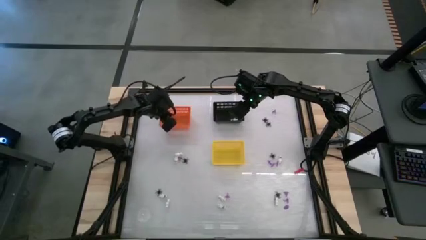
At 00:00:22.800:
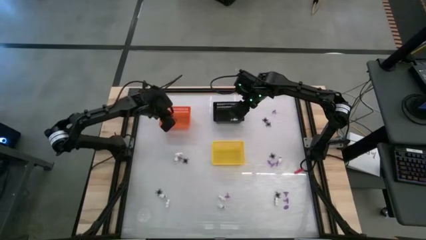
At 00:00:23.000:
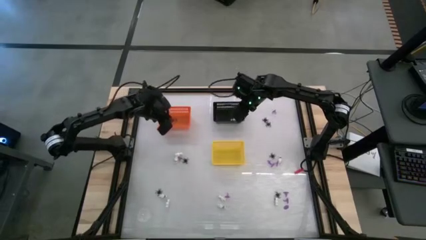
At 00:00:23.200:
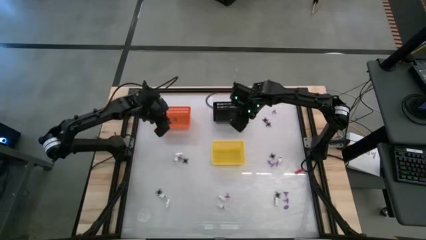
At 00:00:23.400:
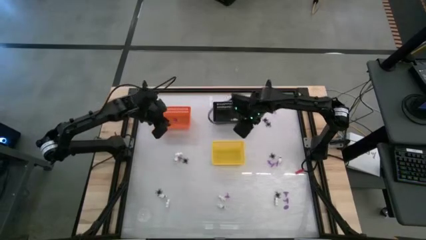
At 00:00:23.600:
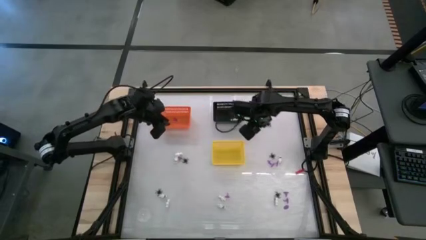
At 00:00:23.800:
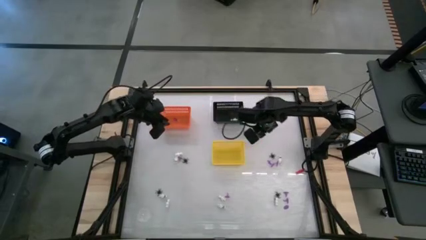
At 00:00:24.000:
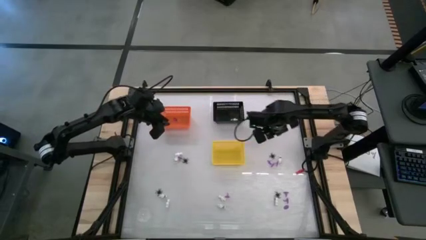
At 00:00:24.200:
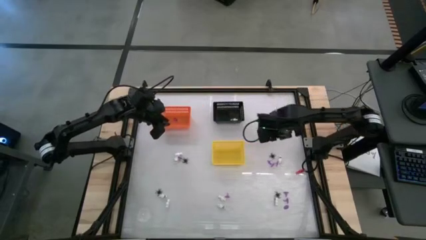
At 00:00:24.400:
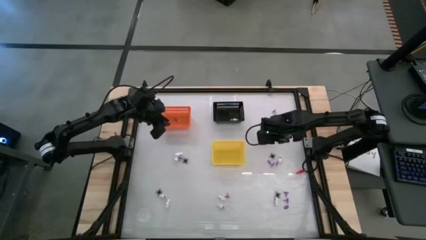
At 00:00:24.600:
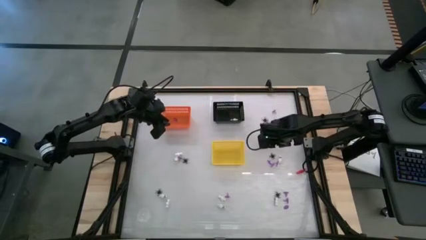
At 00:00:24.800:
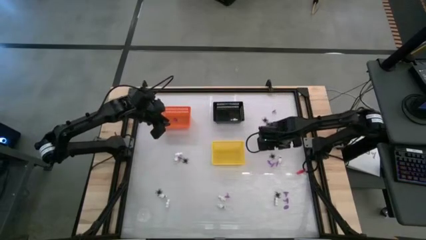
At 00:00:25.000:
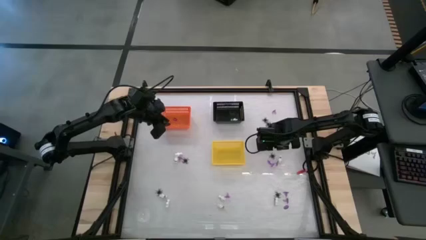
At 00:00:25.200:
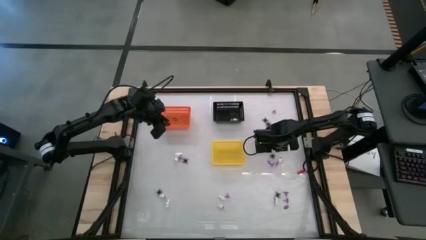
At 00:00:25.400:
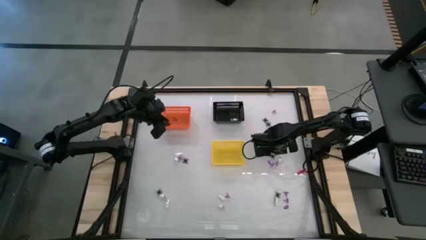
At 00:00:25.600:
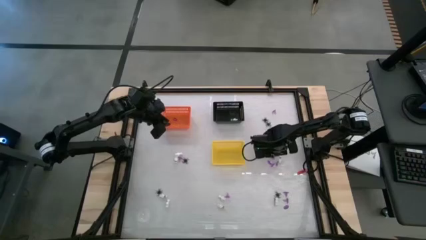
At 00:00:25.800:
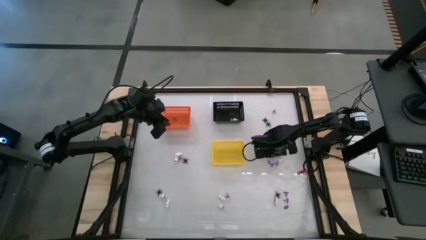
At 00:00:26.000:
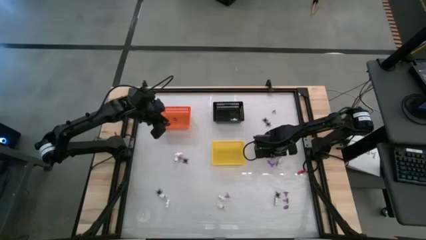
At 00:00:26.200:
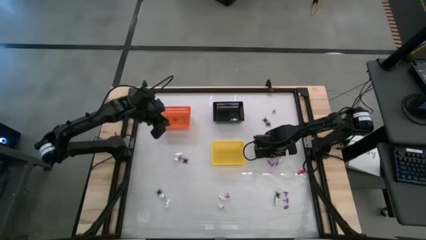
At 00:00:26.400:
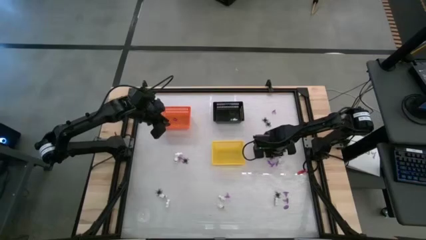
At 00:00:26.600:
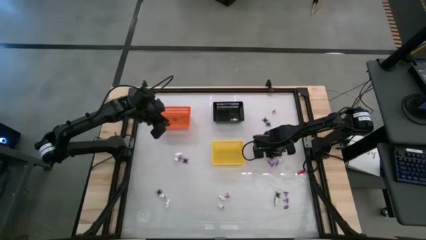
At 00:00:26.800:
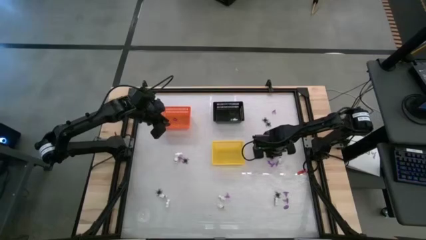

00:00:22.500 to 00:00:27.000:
Task: Sort Halloween decoration
Put the black spider toy into the yellow bin

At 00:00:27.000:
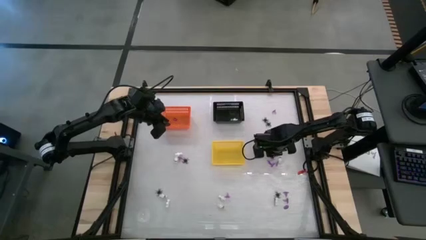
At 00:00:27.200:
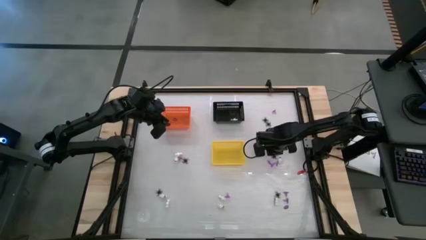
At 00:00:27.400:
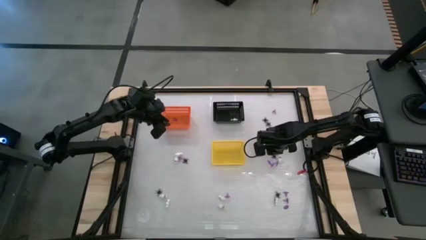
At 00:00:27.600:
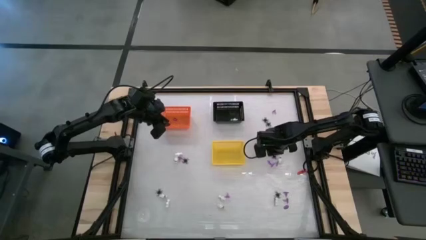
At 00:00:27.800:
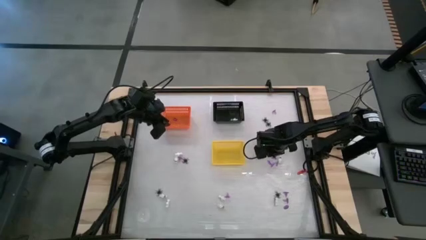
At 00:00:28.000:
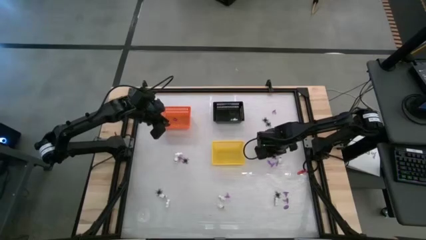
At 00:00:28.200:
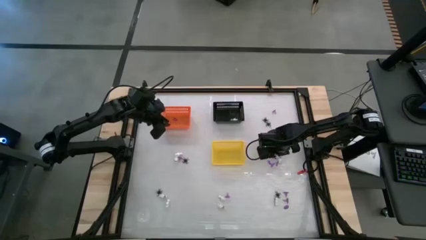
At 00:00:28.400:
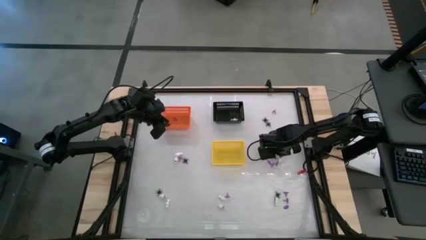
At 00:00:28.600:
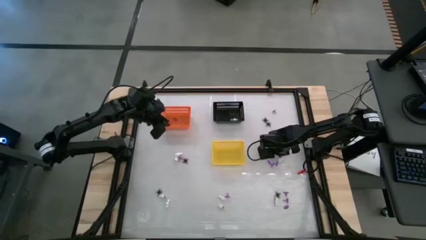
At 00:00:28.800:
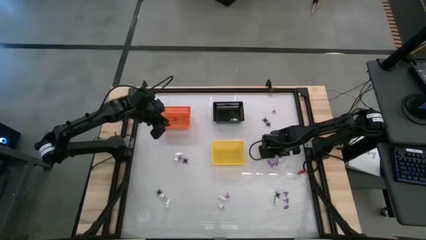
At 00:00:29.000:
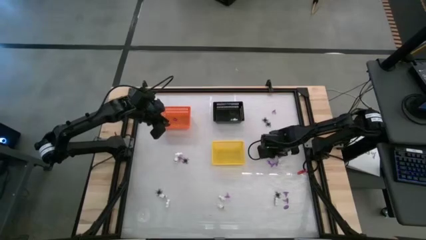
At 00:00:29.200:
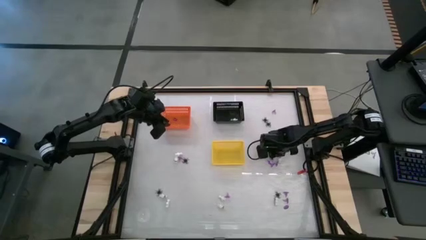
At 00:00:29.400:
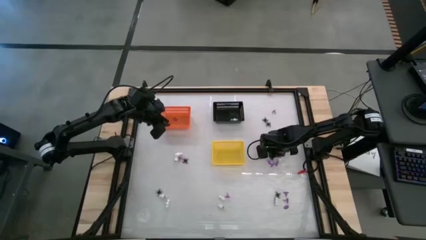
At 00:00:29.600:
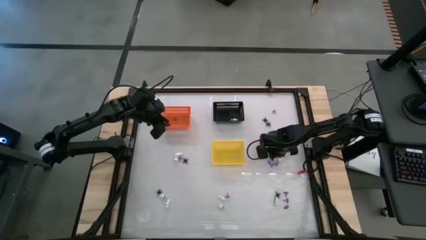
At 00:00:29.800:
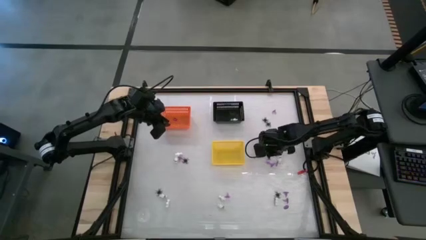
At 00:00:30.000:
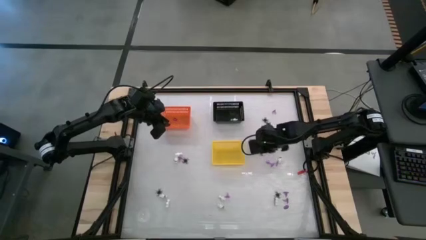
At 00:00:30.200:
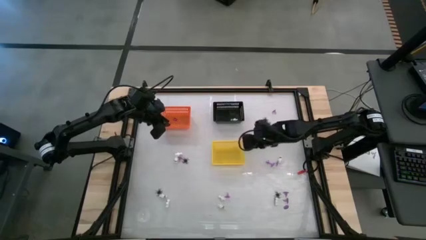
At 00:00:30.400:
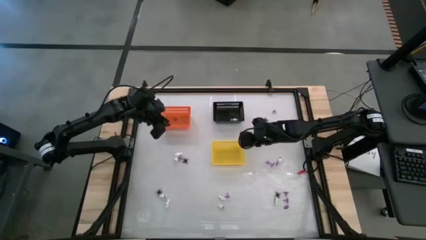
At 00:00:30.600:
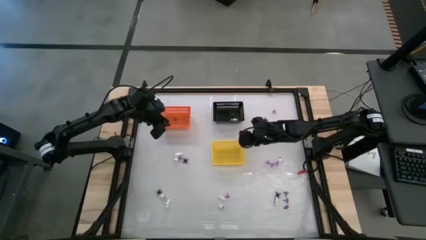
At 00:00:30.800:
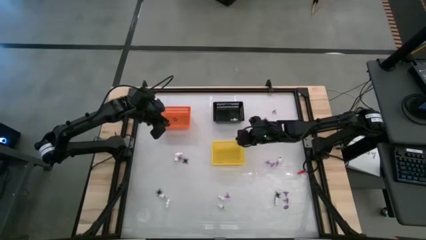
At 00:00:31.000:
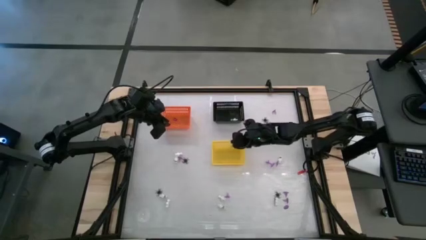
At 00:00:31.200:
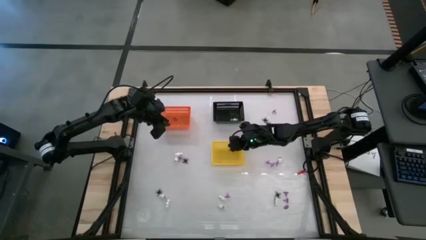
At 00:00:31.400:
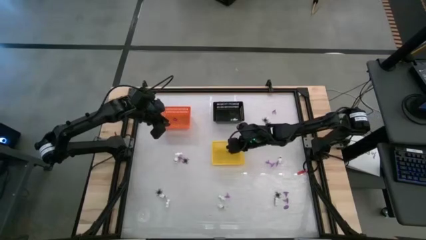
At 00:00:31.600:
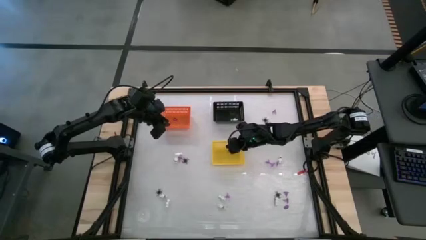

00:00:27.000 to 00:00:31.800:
Put the black spider toy into the yellow bin

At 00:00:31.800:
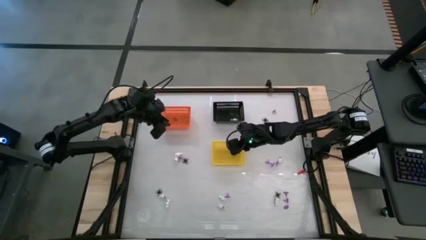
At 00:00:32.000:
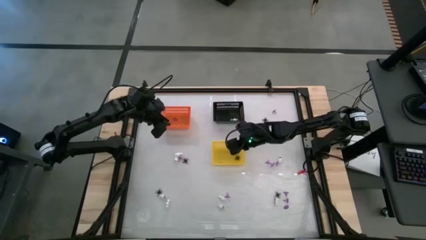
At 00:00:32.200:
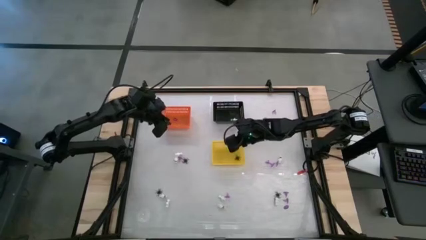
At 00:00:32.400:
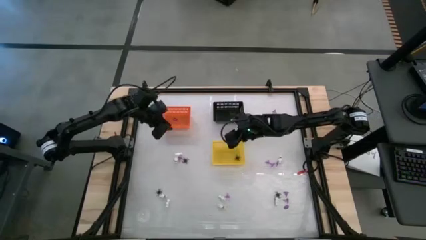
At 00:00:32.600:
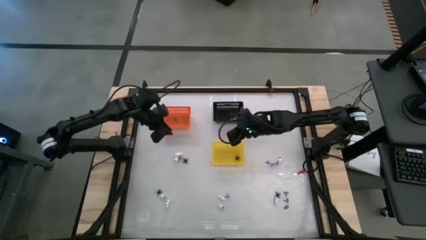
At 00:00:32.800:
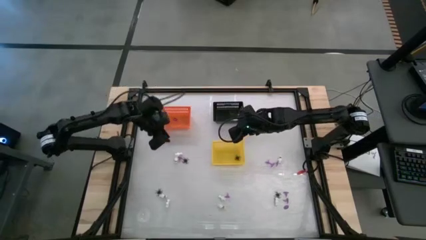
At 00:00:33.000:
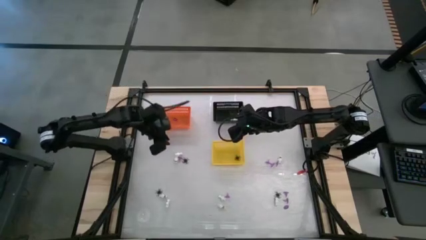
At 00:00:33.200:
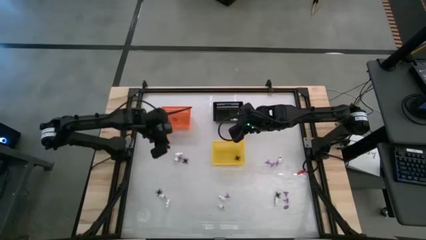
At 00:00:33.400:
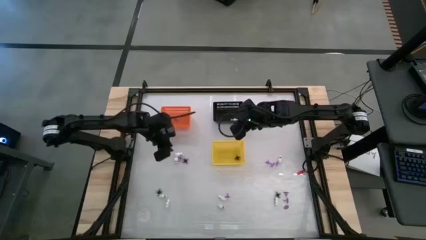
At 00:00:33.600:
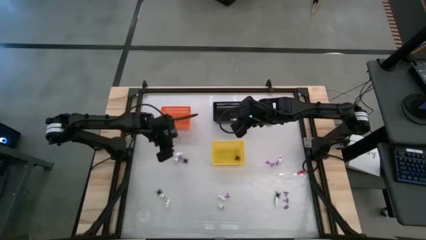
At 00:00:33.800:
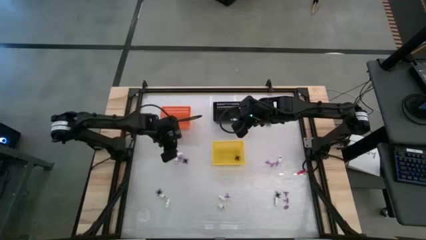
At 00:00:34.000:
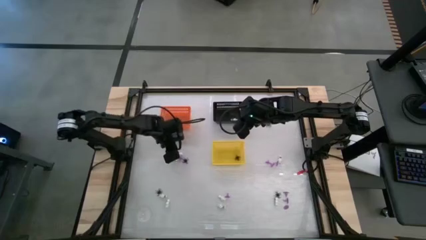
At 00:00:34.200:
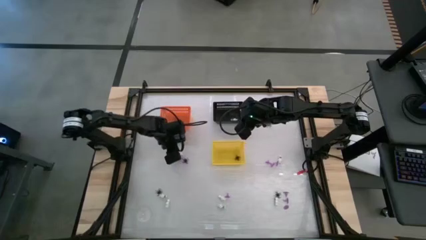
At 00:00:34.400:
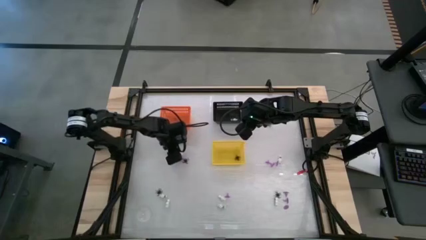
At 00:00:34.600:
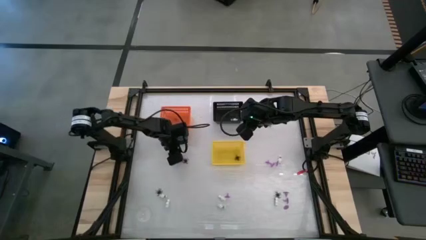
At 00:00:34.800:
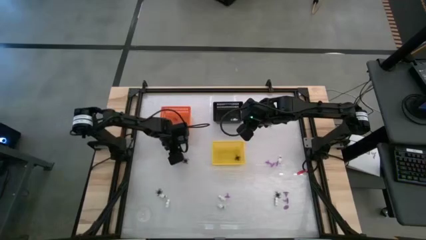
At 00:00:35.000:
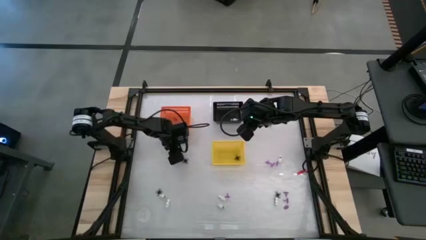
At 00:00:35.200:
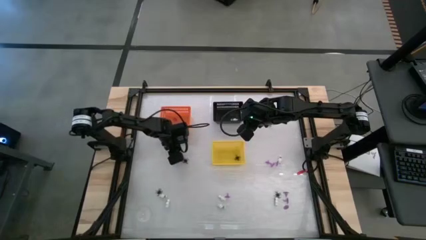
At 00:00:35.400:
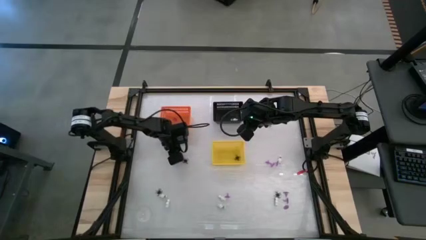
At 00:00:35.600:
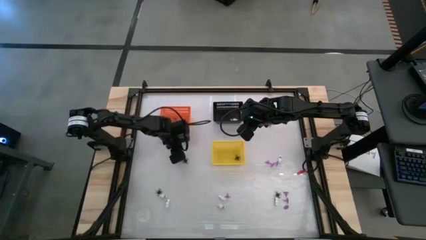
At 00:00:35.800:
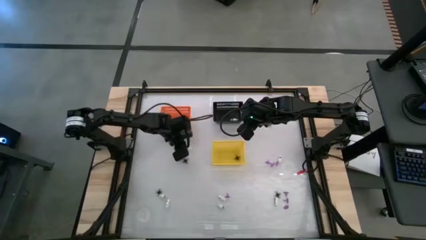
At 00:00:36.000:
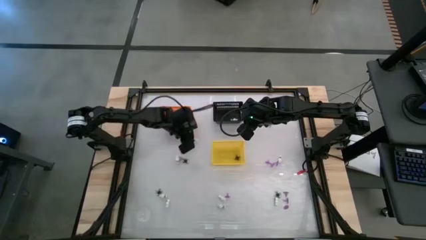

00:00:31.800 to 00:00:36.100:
Put the white skeleton toy into the black bin

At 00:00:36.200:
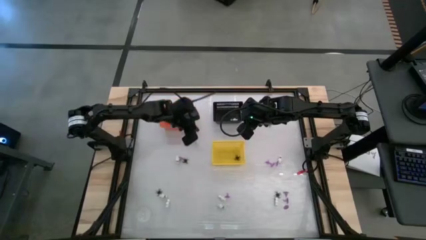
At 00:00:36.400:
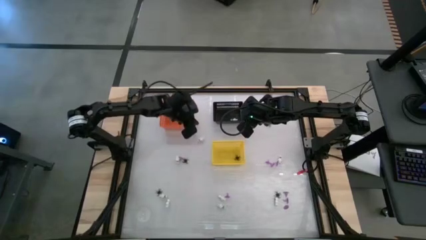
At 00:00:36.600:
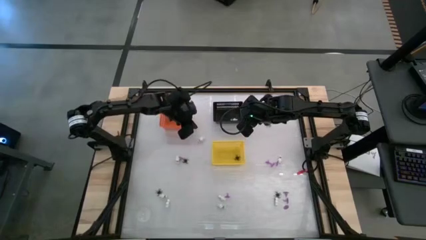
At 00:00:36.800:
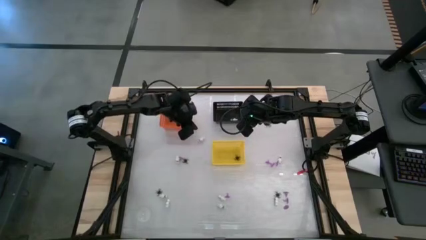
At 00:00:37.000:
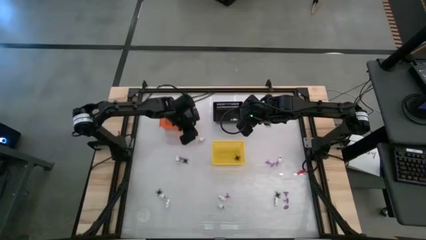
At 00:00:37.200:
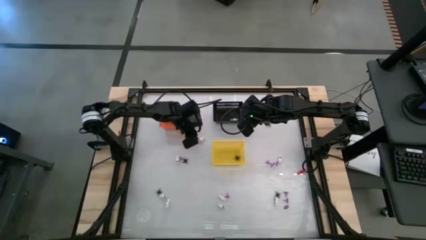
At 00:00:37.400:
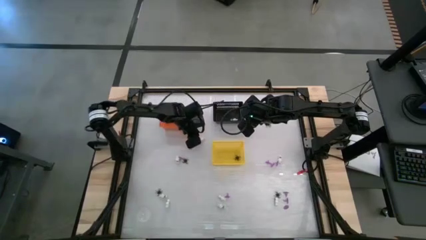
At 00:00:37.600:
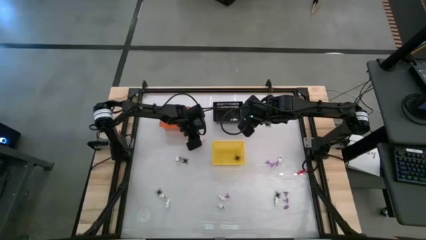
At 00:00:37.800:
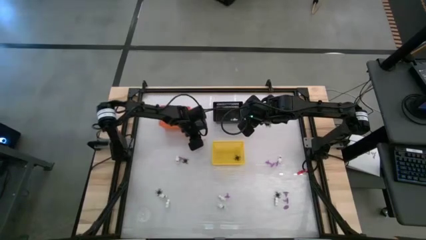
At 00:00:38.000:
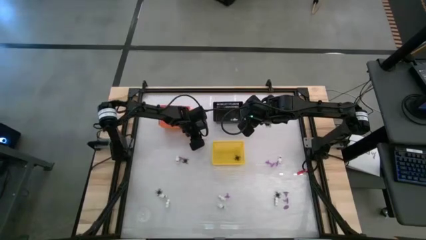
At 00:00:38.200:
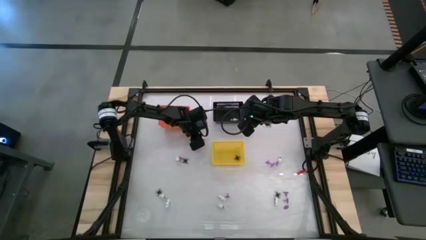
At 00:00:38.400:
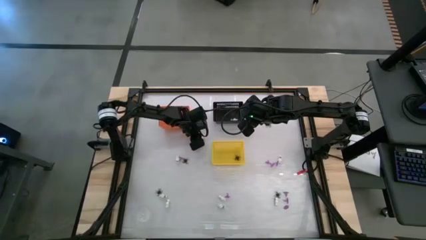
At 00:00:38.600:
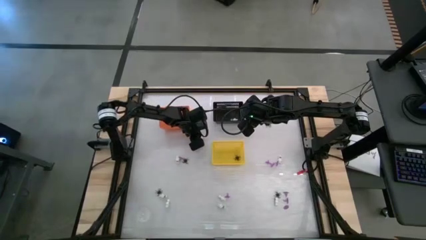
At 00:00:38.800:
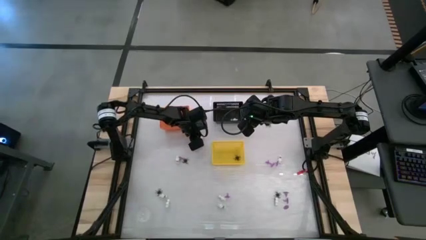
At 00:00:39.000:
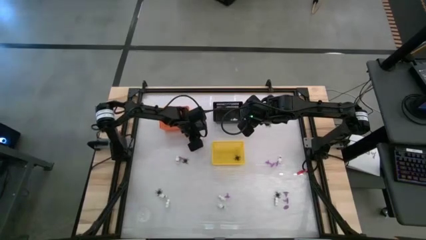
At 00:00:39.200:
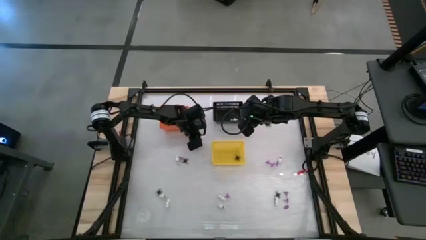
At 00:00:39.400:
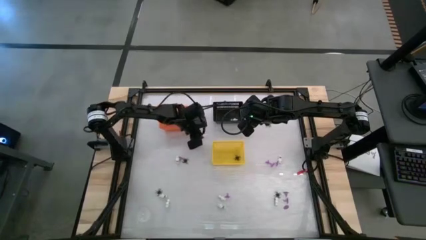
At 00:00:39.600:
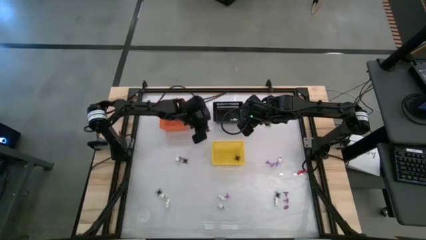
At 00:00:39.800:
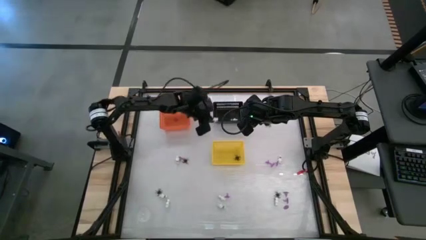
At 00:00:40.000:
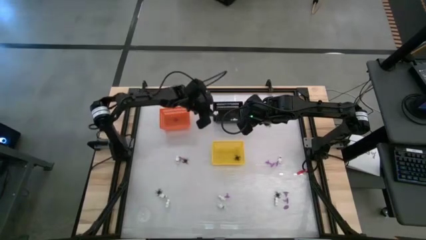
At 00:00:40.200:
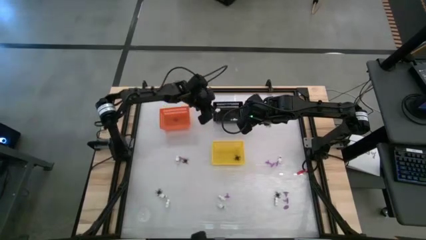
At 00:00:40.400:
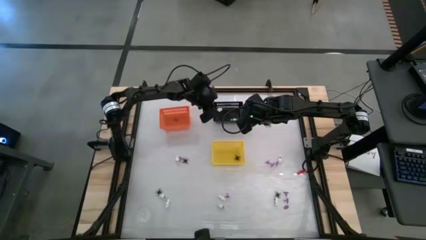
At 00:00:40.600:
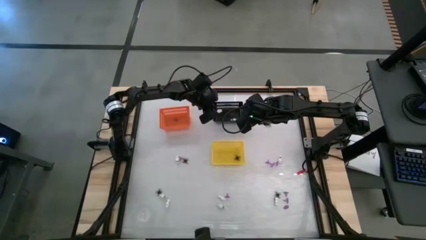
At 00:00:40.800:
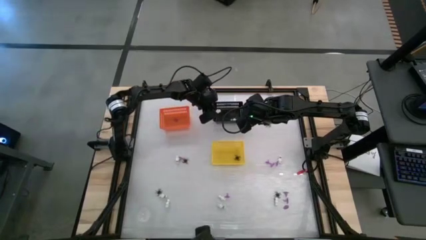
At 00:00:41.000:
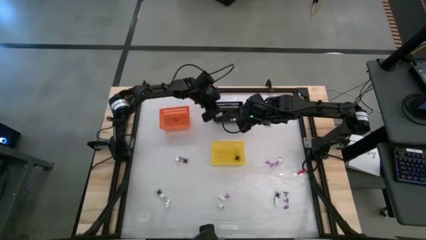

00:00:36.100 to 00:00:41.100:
Put the white skeleton toy into the black bin
